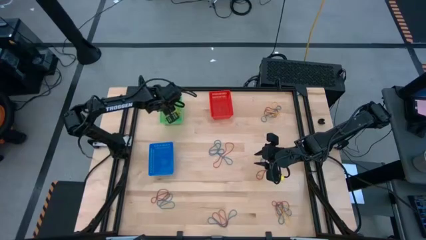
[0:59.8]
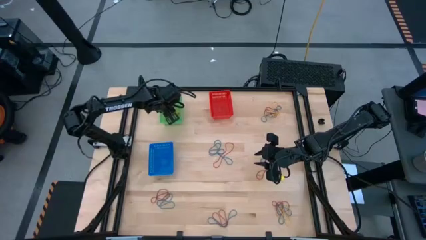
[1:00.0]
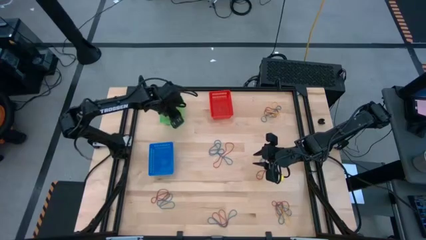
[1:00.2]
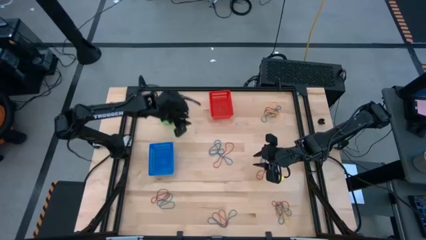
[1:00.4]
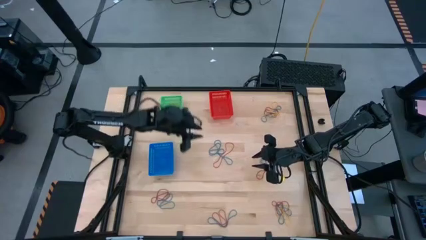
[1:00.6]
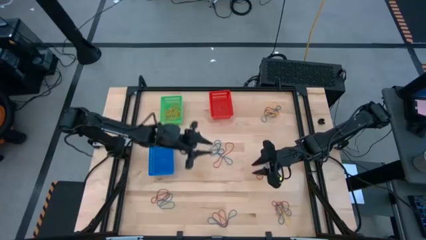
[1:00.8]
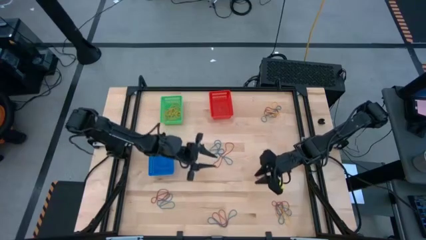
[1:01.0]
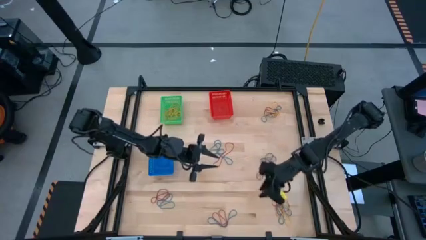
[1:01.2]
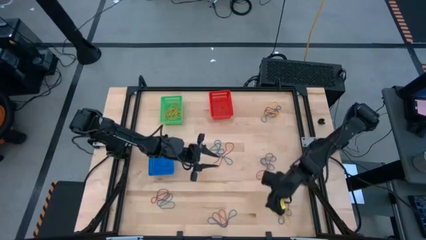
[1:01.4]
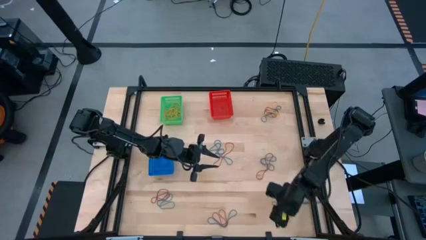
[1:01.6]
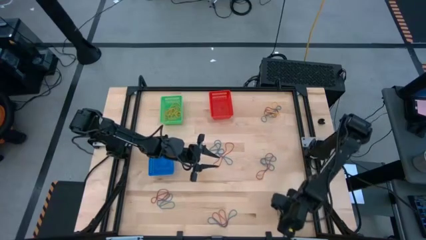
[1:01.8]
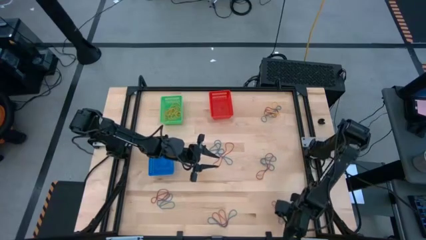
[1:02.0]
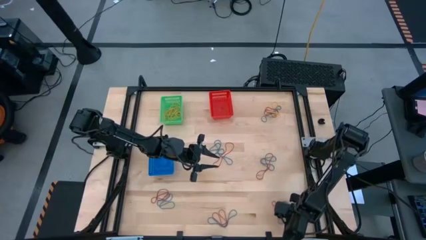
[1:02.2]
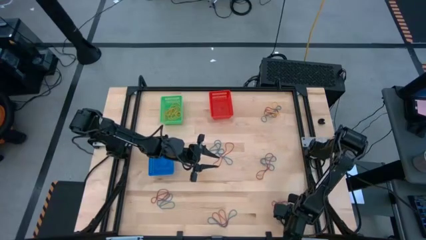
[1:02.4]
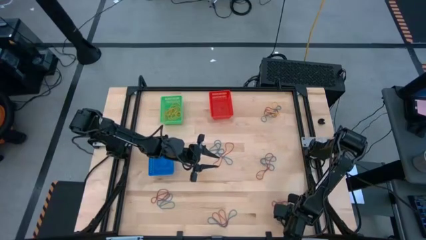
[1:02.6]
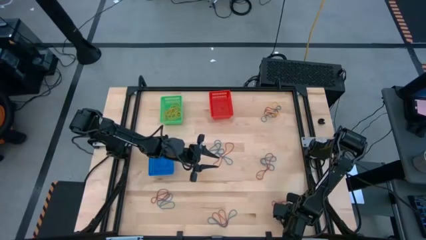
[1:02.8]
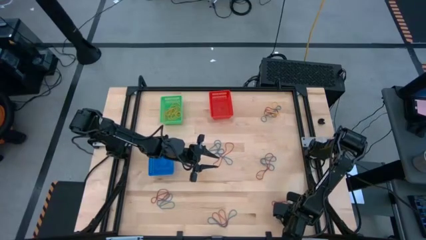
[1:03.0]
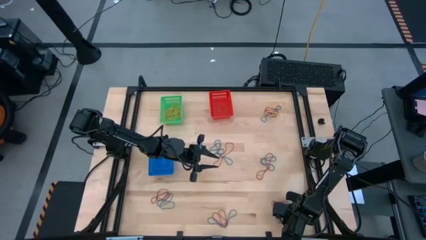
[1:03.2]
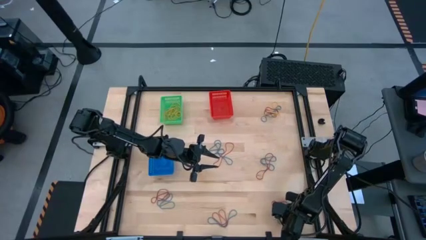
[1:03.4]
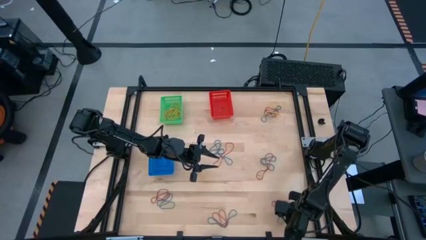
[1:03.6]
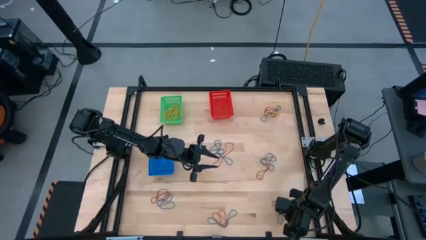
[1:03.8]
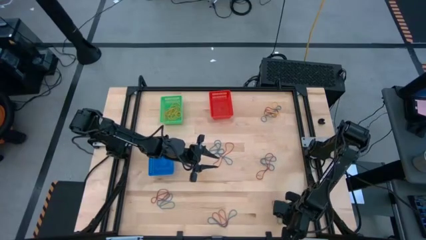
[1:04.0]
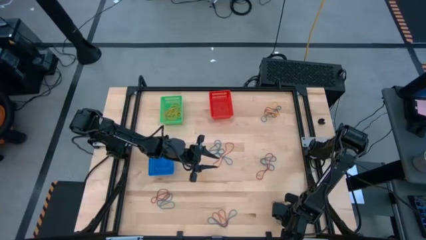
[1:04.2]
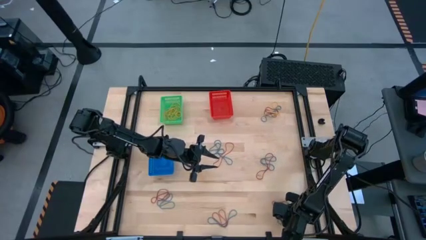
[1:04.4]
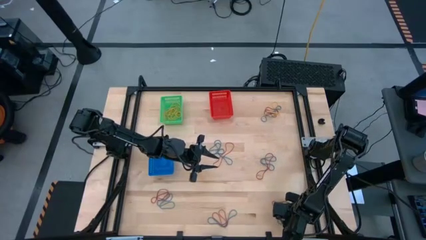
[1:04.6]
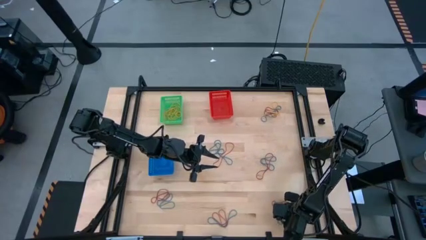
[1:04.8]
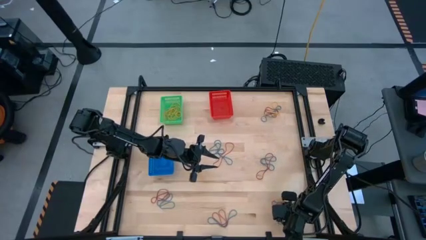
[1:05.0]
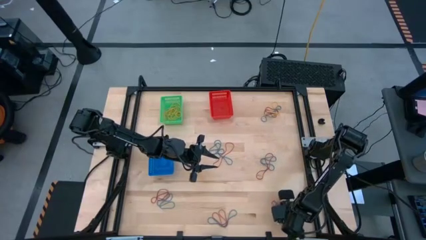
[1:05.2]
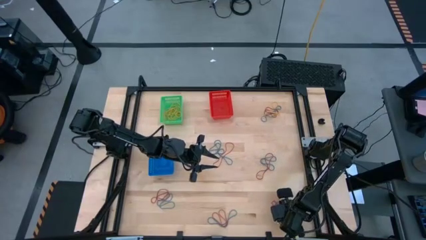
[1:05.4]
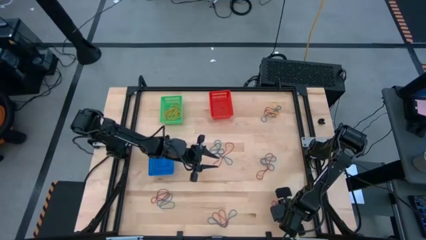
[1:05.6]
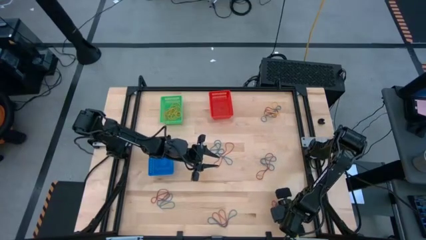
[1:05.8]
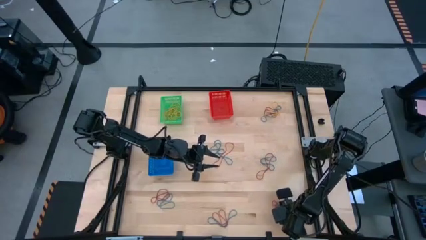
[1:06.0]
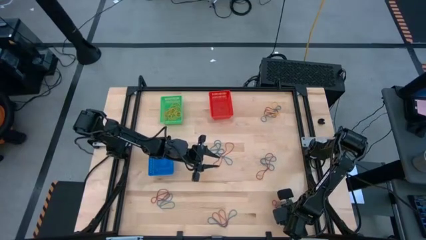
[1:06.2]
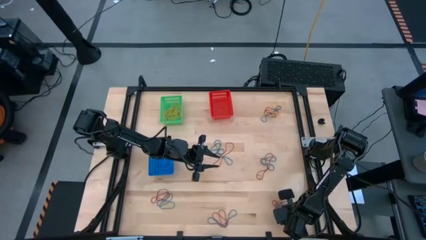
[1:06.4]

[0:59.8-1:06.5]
Task: Sort rubber bands into baskets
Put the yellow rubber band into the green bin

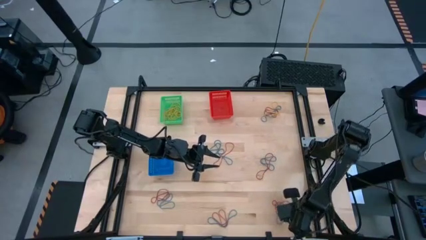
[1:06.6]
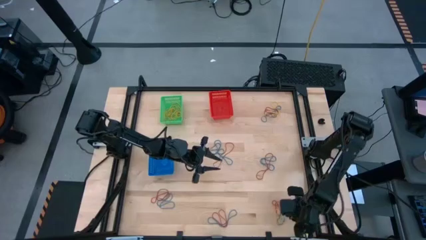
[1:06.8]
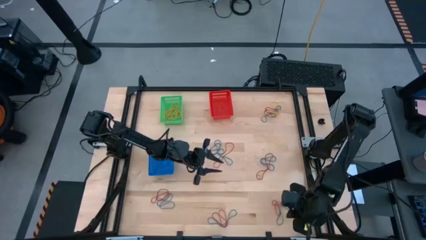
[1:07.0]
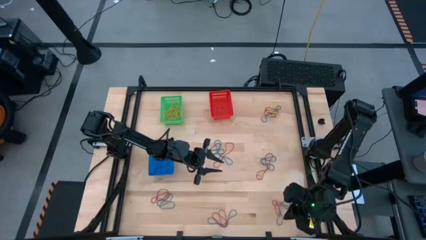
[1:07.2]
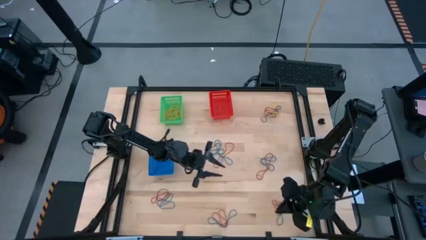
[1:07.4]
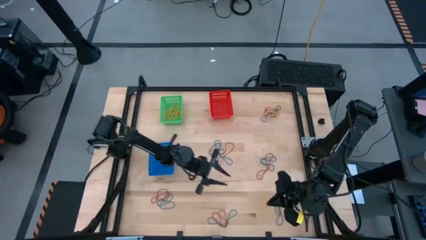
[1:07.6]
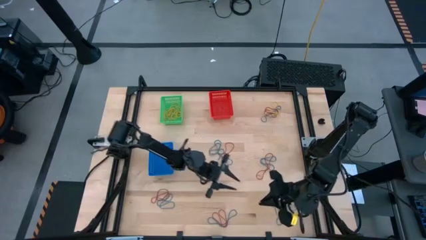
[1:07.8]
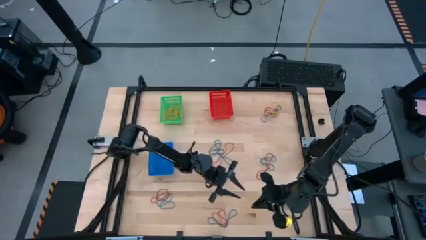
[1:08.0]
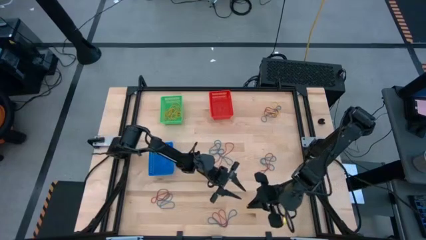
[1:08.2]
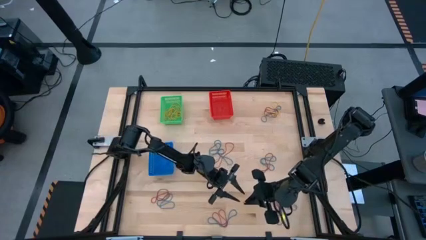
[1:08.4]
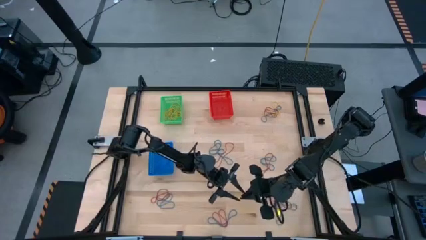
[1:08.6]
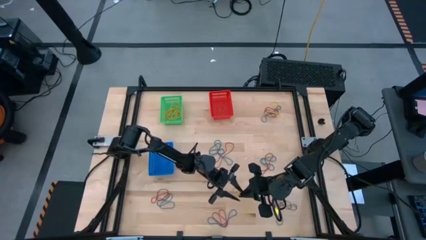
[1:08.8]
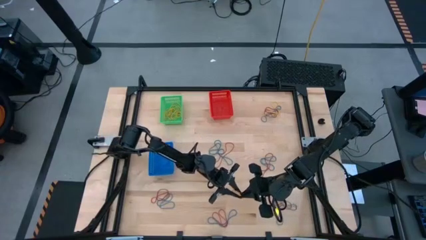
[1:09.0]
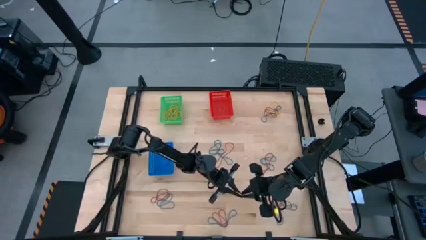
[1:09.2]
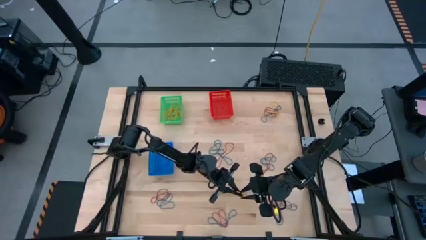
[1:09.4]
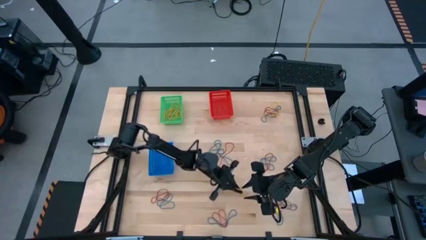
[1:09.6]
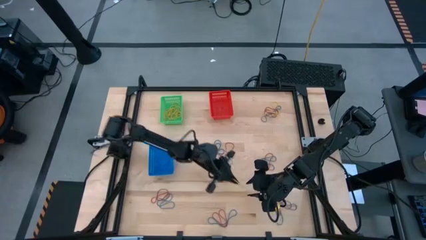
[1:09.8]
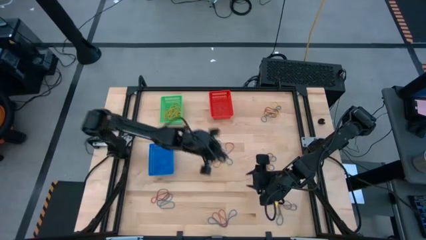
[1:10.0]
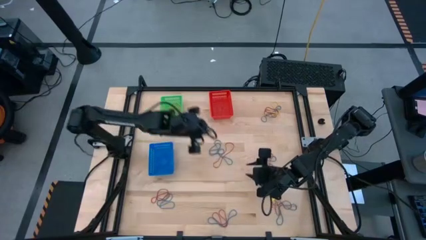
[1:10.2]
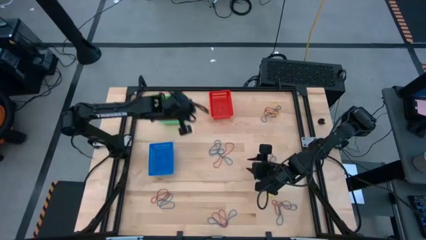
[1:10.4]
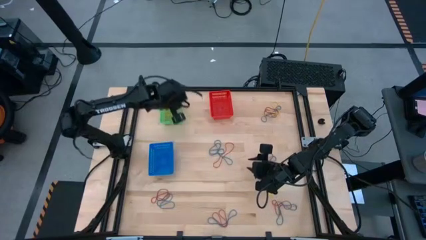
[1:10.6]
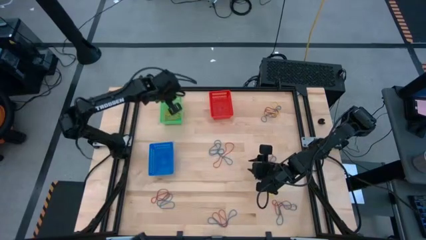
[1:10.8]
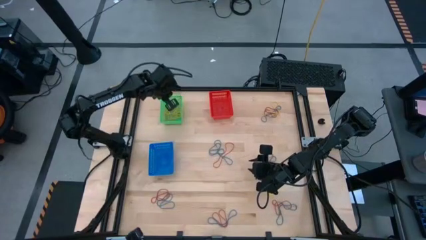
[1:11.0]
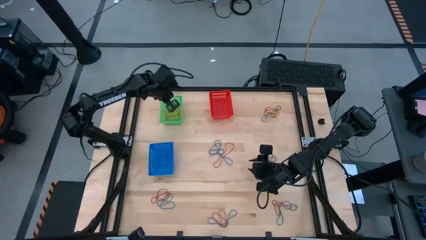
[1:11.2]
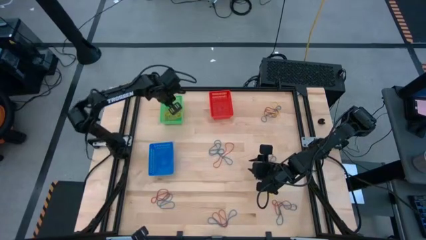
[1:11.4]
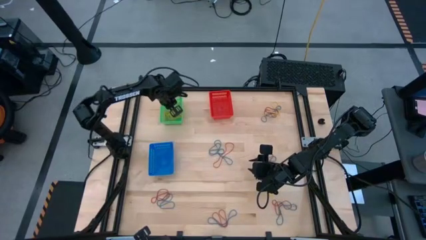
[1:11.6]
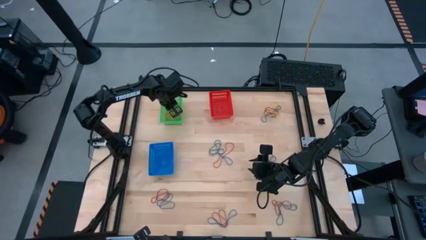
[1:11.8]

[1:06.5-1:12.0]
Put the yellow rubber band into the green bin

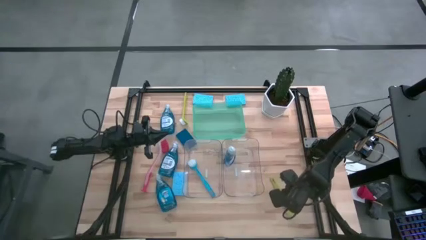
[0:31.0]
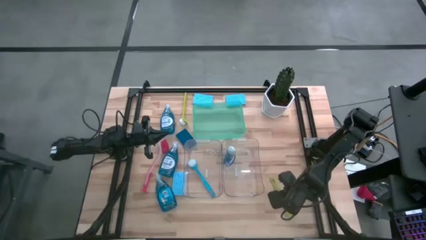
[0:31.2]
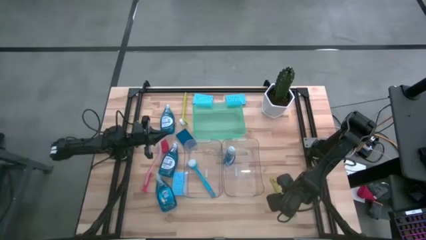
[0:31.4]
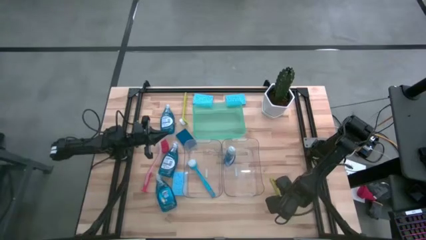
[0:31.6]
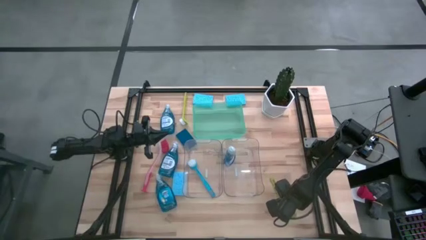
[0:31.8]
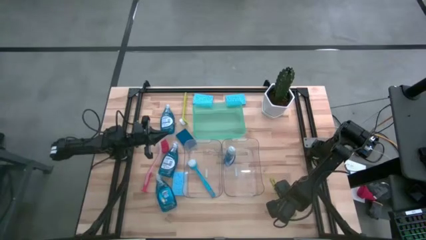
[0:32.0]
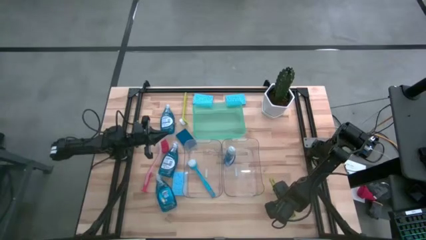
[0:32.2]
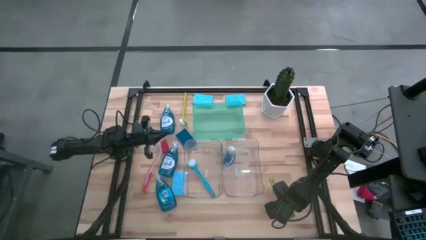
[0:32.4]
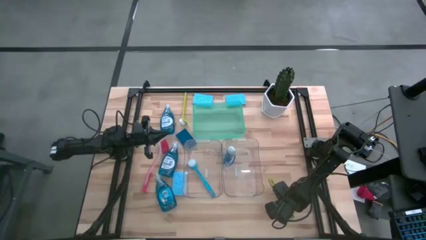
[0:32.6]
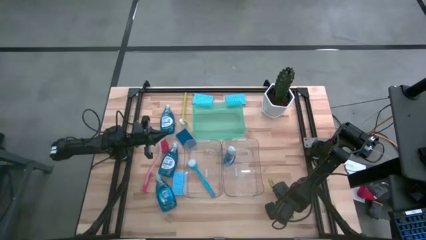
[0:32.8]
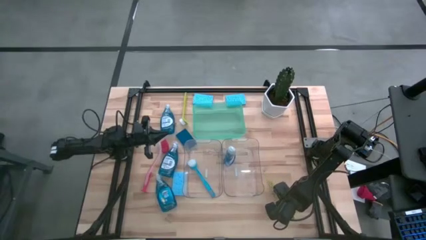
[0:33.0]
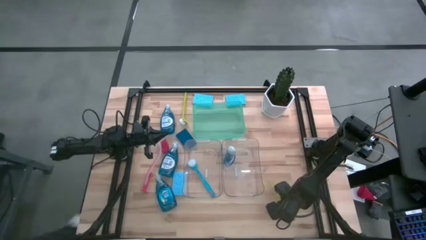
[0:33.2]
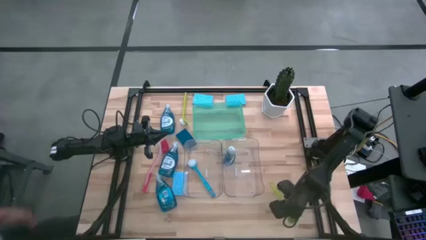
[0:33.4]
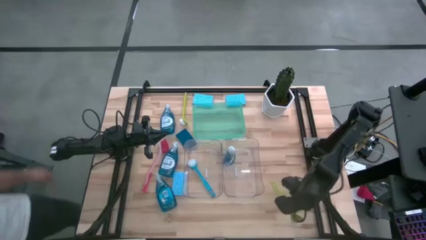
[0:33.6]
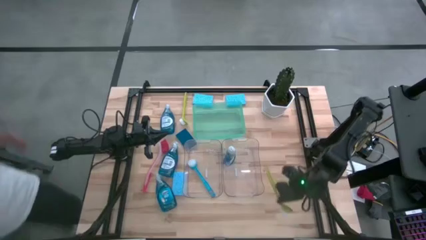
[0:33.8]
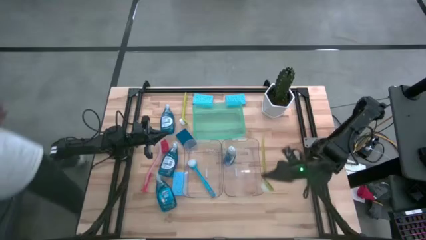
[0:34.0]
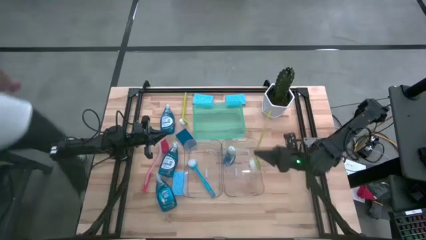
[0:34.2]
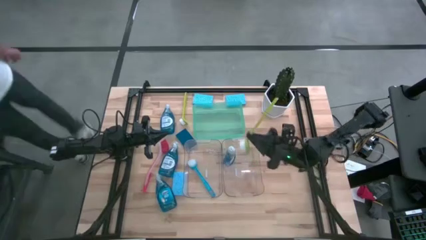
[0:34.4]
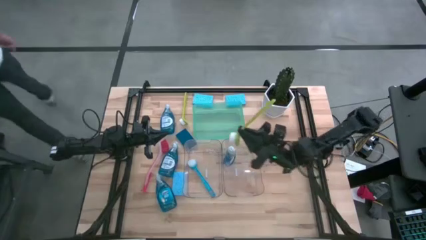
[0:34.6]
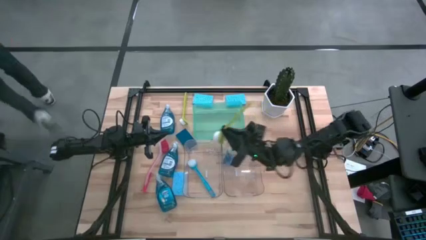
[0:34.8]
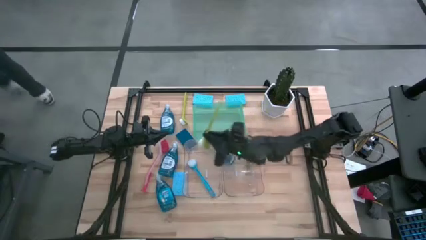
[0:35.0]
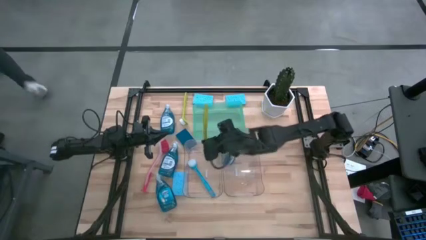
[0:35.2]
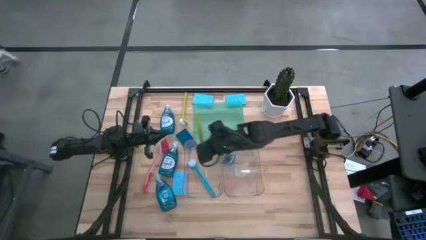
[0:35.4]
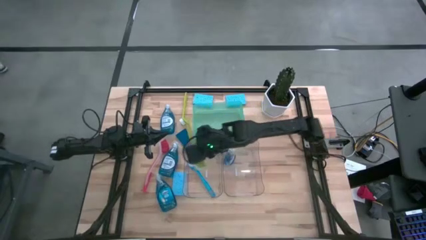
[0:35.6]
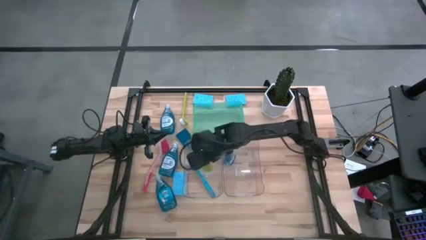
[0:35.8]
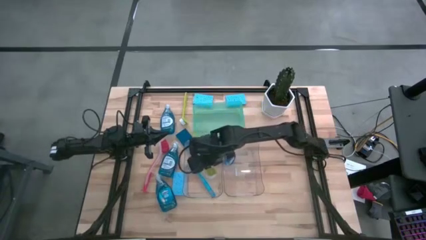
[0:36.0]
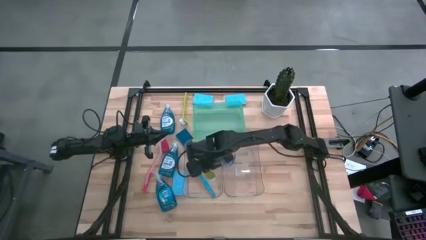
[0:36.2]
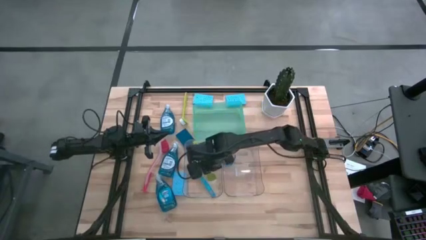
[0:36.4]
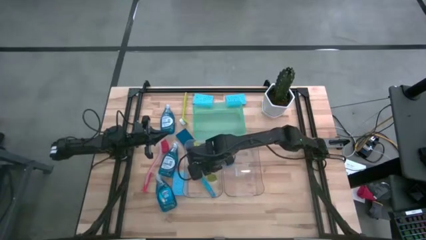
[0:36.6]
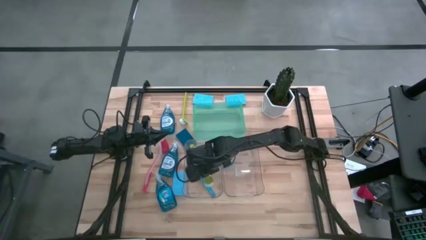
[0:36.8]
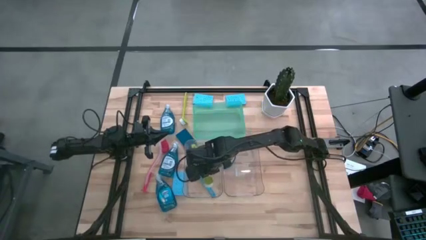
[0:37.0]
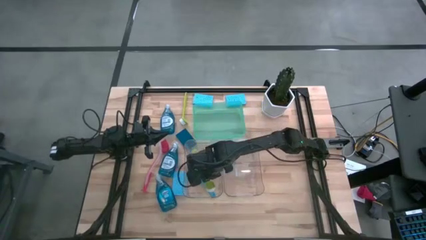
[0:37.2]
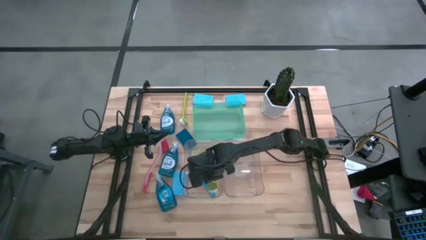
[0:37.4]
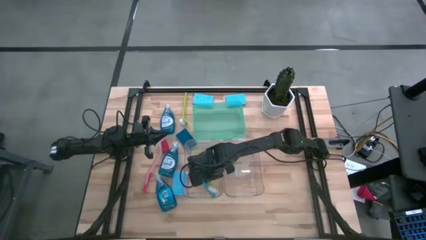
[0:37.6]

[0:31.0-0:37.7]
Task: Pick & Place Kitchen Sink Supplies
Put the yellow toilet brush into the left transparent bin
